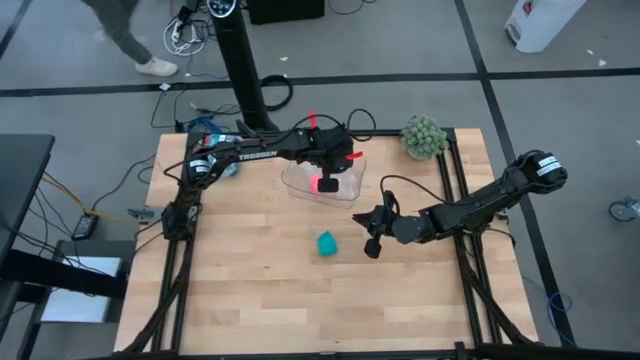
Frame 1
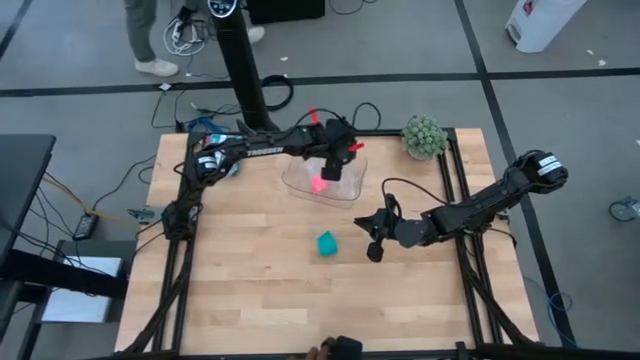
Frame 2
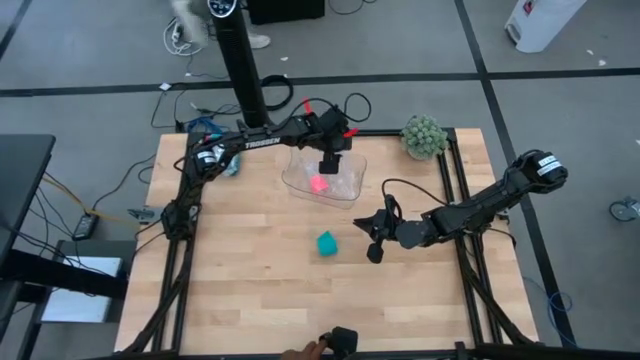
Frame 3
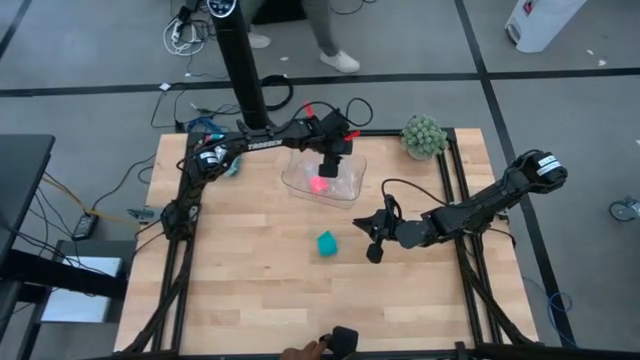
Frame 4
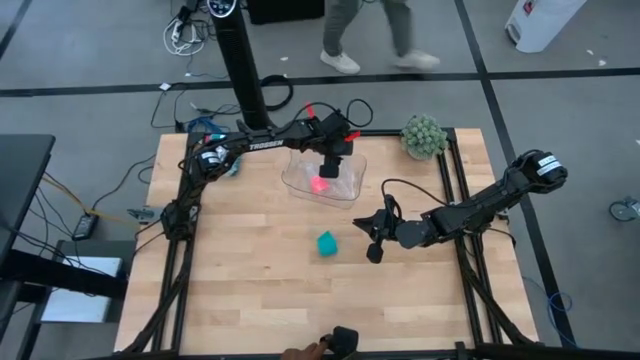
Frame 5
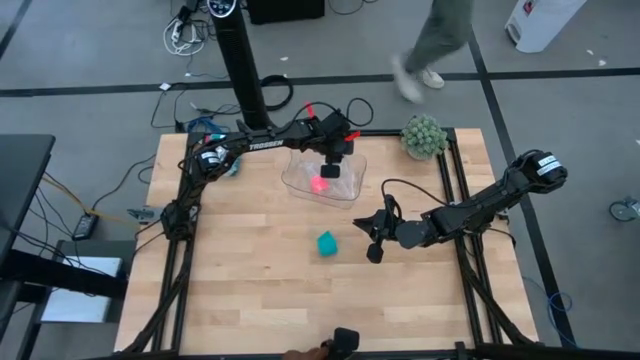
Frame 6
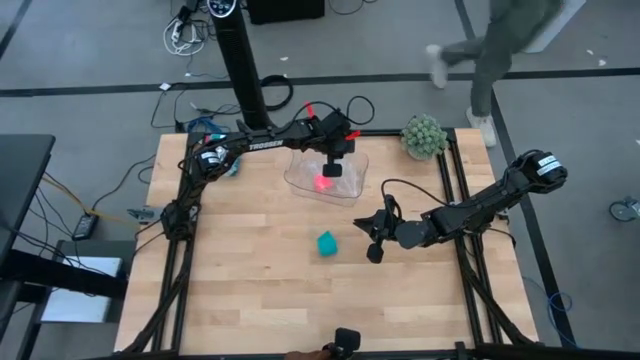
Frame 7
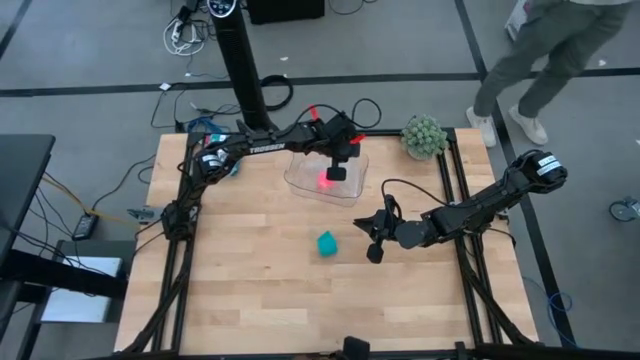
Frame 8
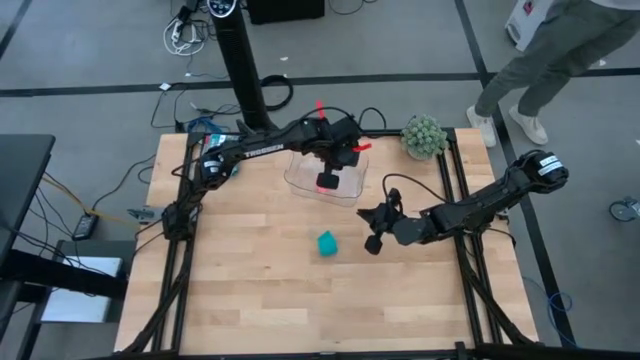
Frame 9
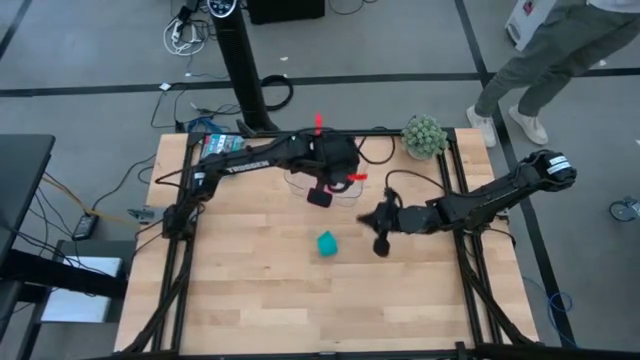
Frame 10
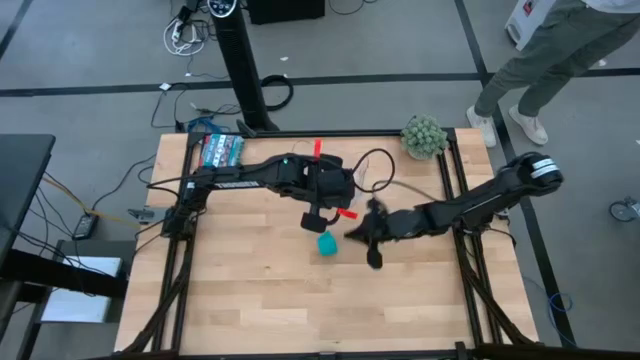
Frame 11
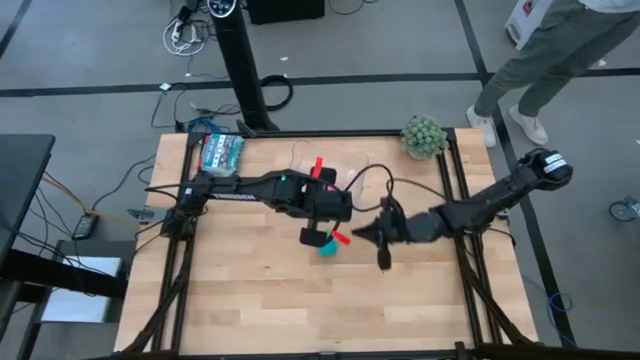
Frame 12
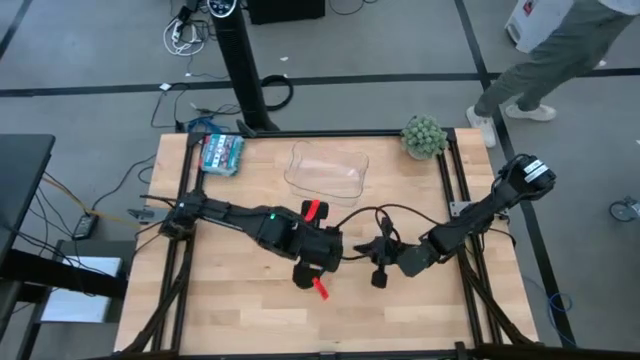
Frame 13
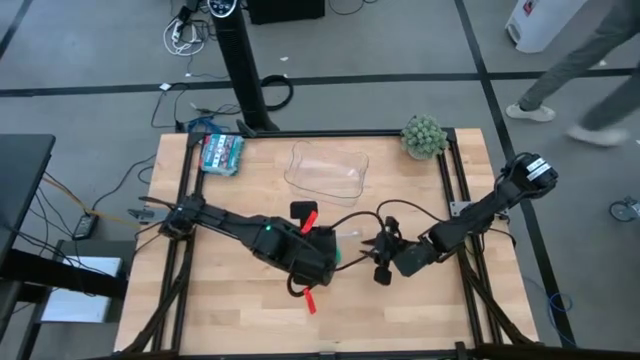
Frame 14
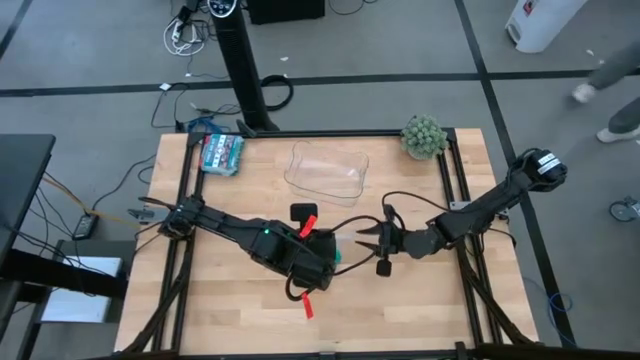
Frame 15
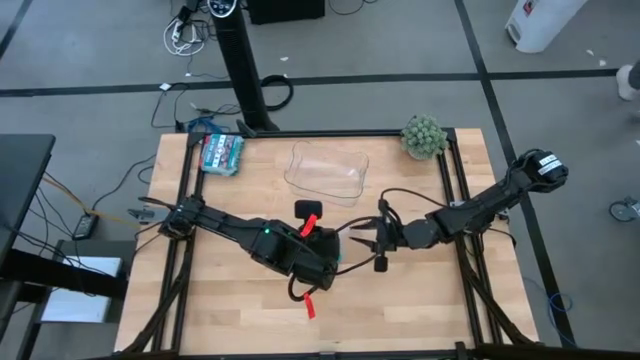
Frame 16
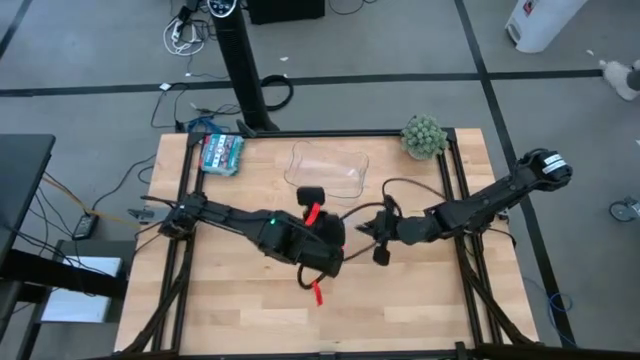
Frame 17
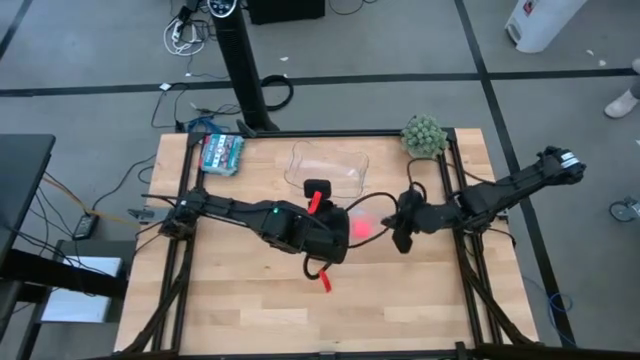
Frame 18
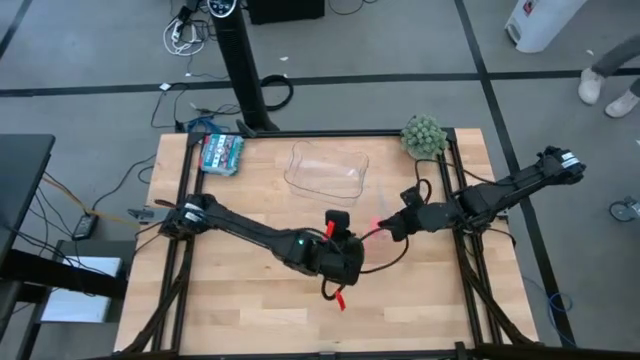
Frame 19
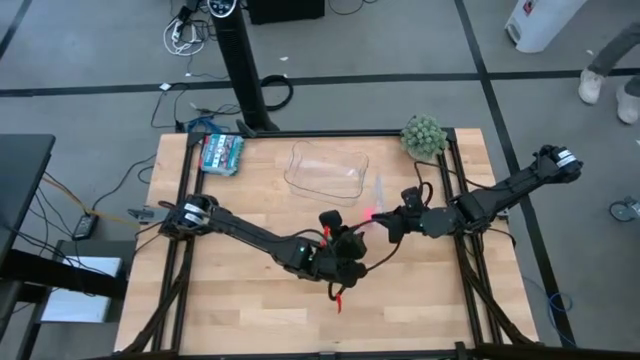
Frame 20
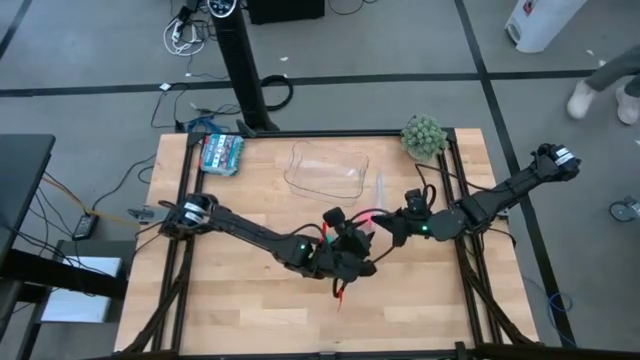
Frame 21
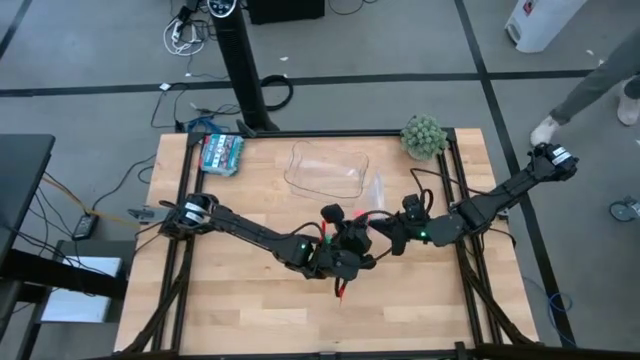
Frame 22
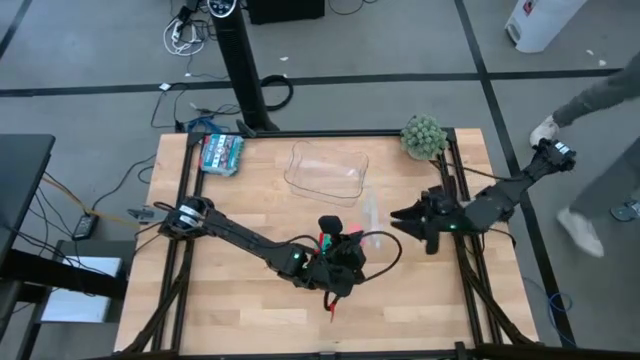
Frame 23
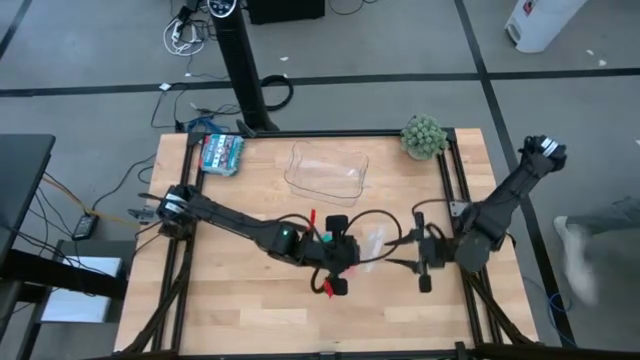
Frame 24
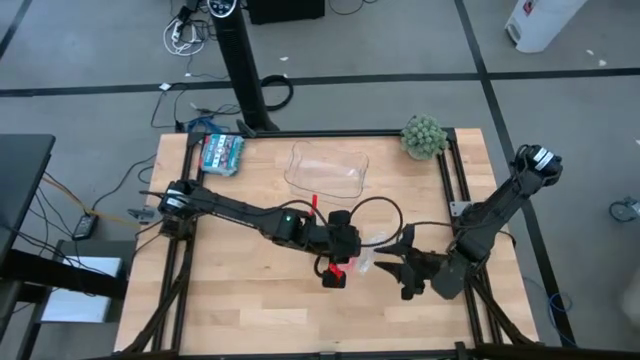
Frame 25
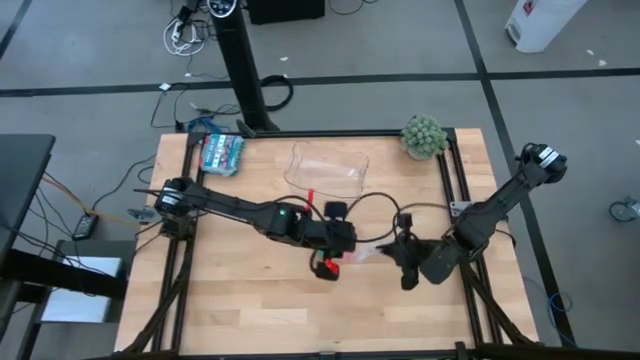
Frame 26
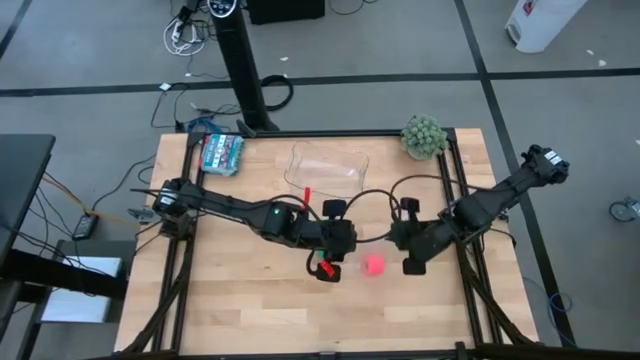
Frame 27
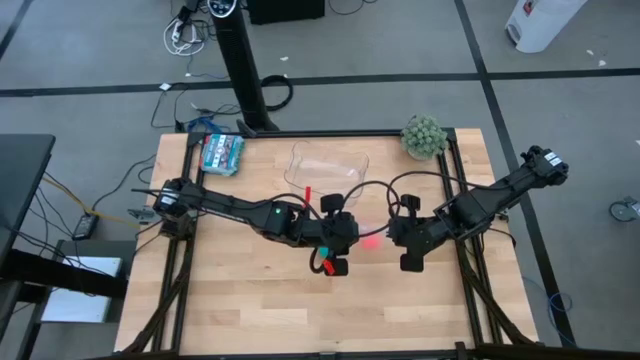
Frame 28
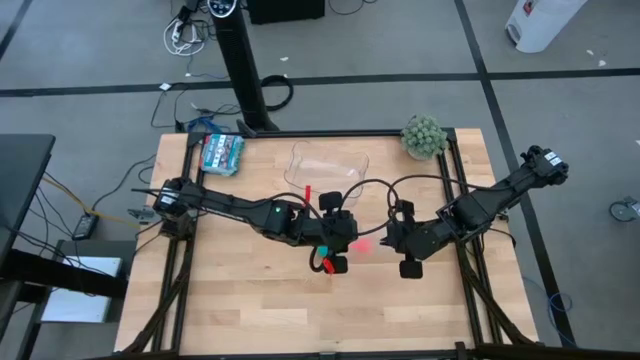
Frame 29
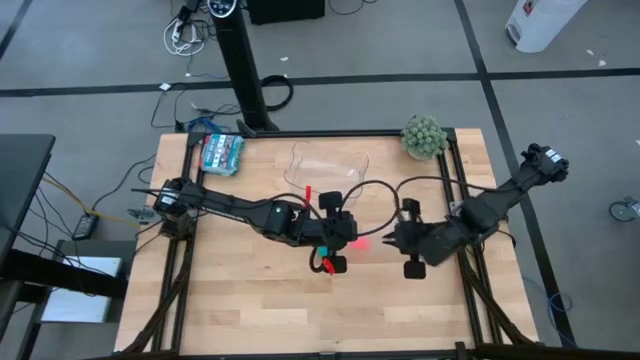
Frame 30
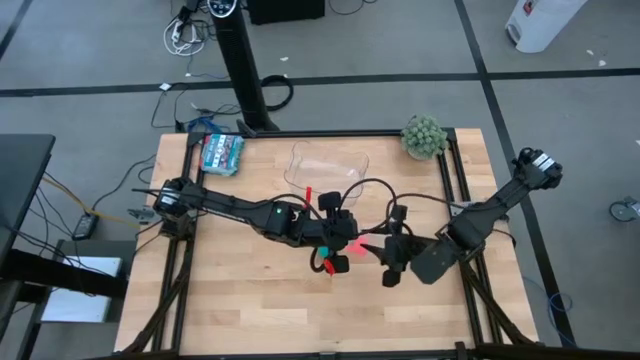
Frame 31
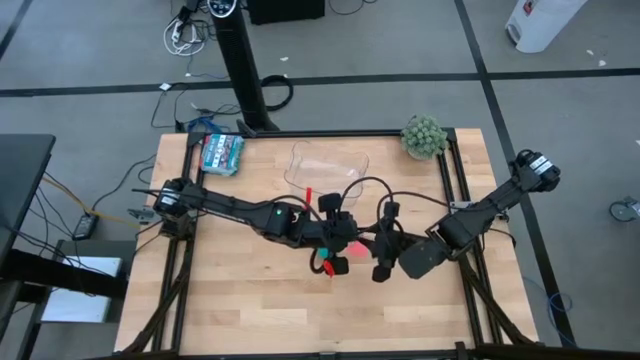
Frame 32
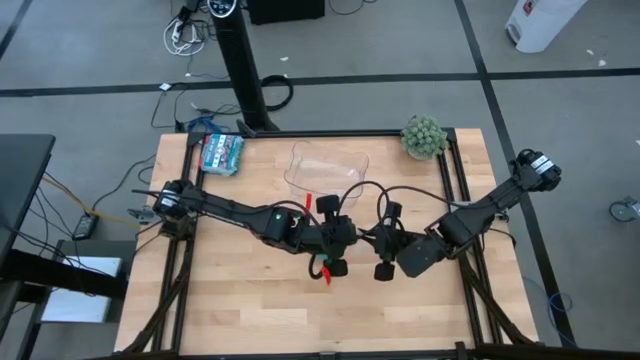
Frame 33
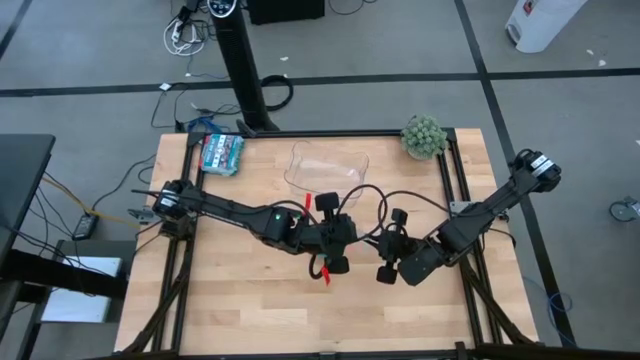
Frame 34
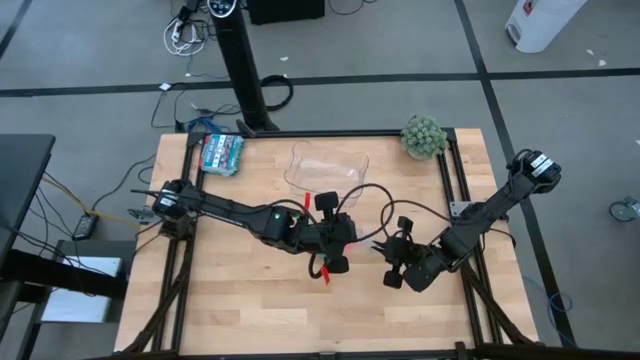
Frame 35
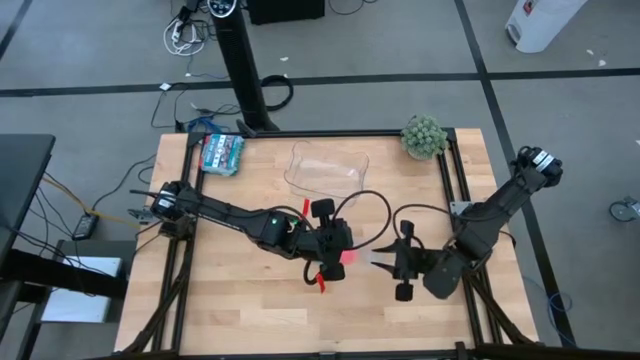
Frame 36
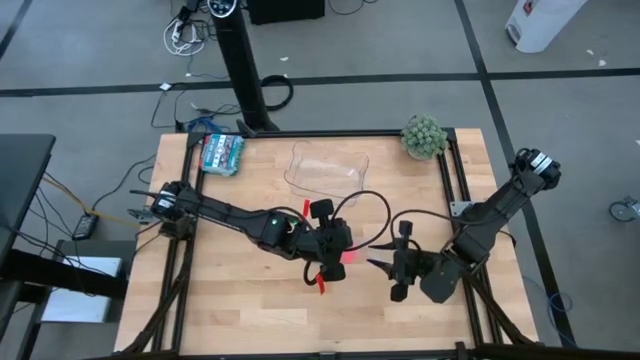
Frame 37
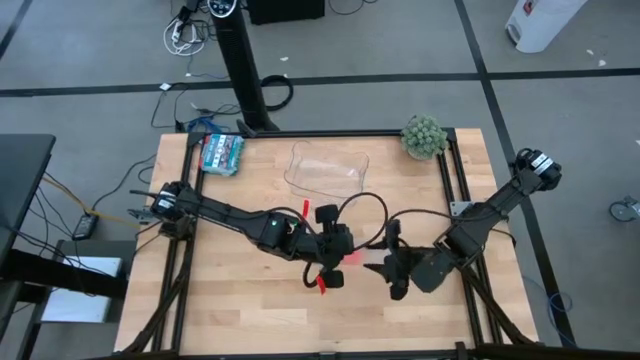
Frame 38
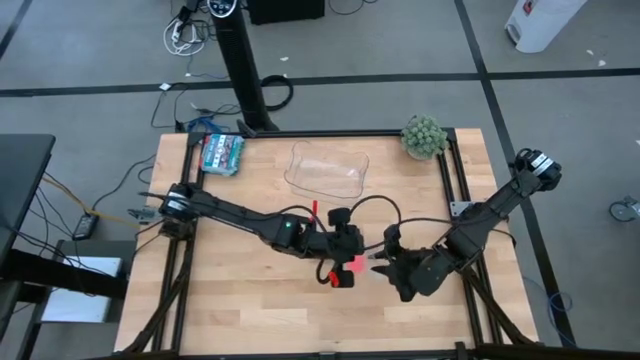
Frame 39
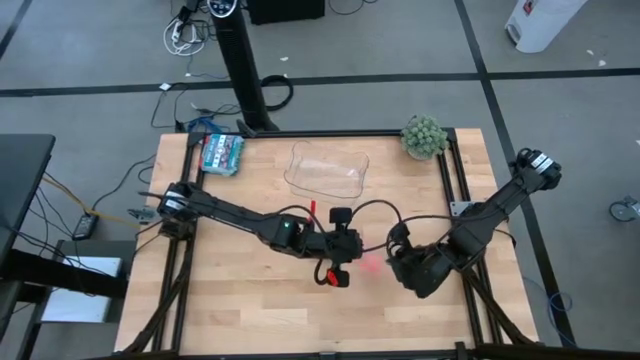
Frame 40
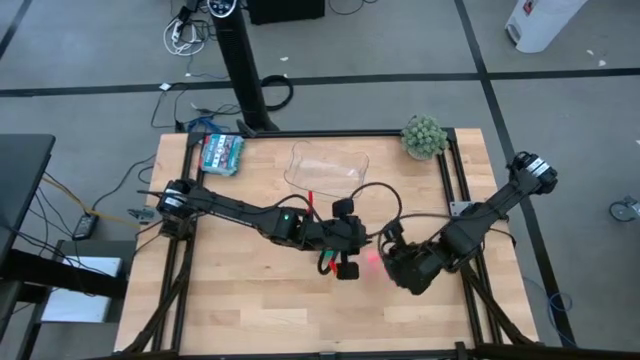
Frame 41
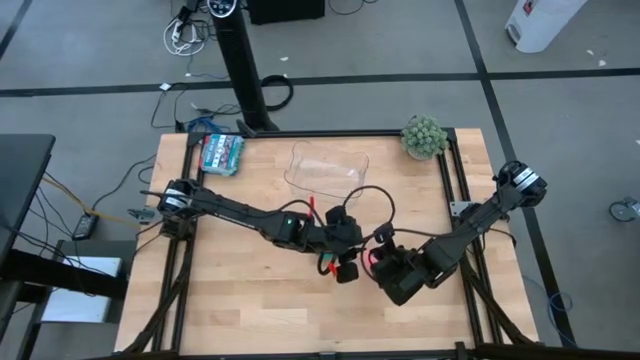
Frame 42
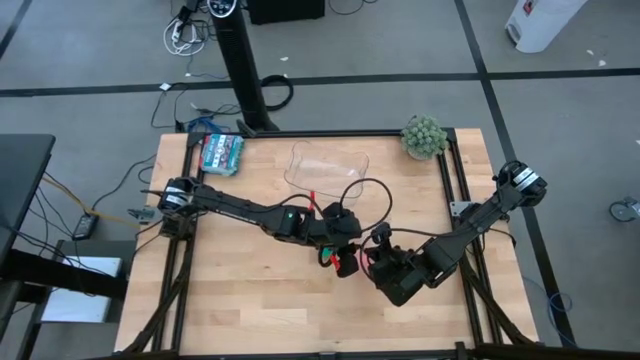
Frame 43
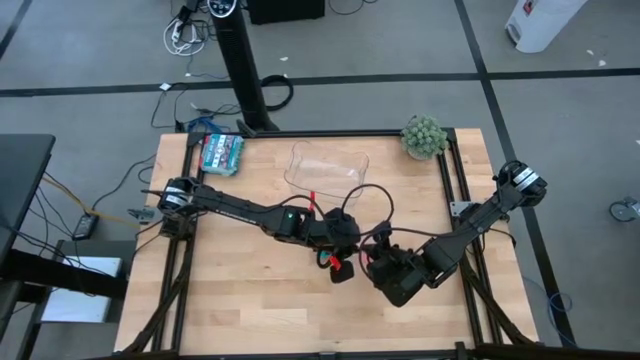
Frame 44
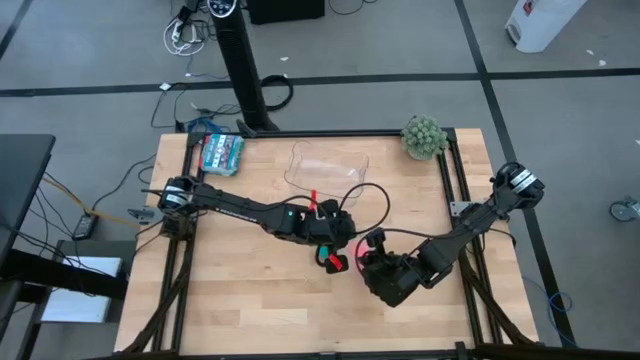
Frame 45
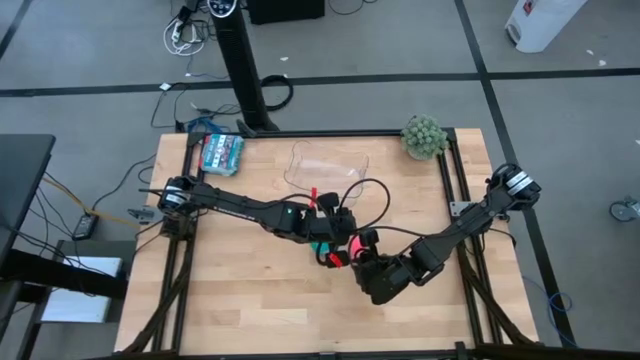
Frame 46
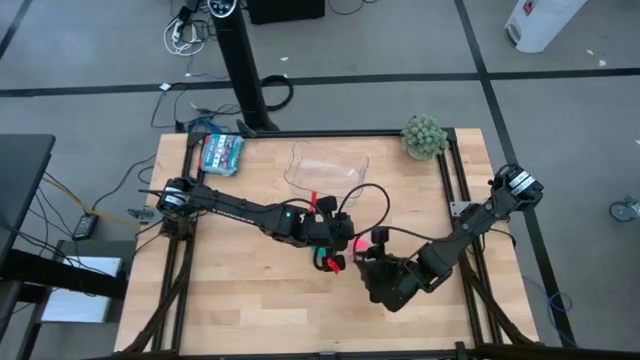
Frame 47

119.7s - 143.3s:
Task: Roll bandage
Open the transparent zip bag
